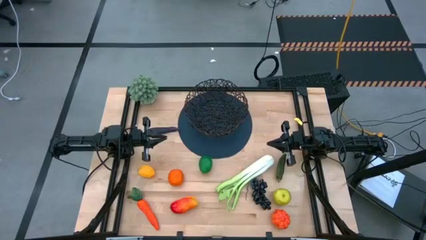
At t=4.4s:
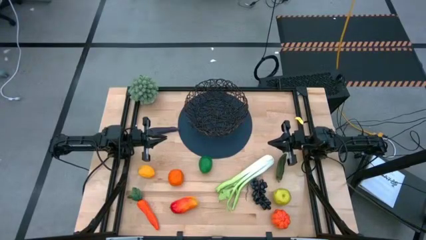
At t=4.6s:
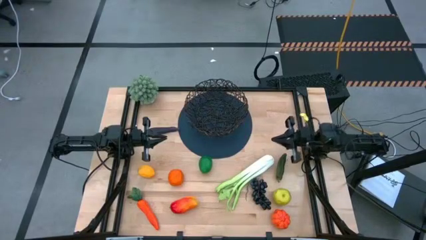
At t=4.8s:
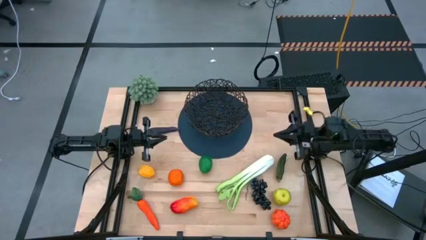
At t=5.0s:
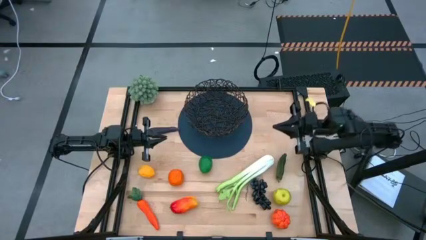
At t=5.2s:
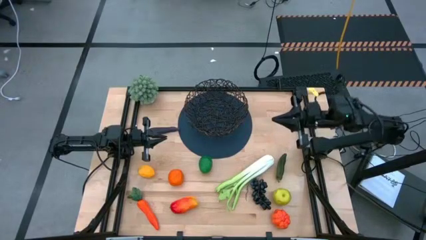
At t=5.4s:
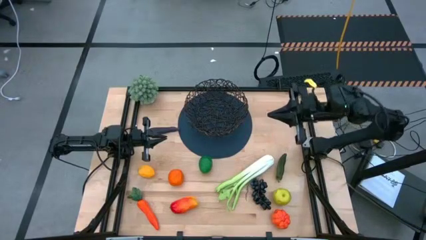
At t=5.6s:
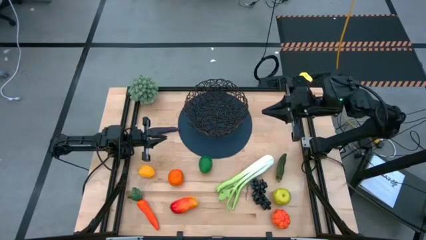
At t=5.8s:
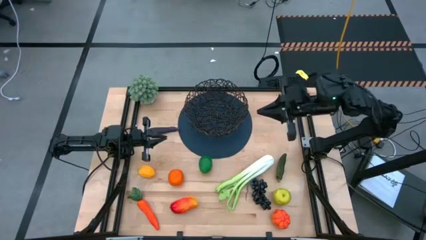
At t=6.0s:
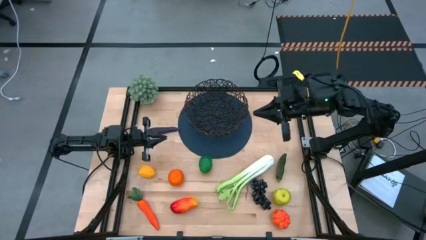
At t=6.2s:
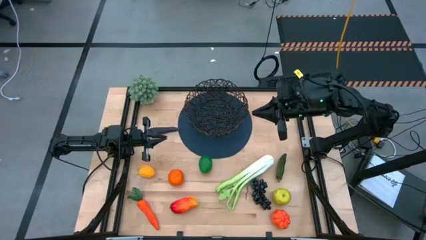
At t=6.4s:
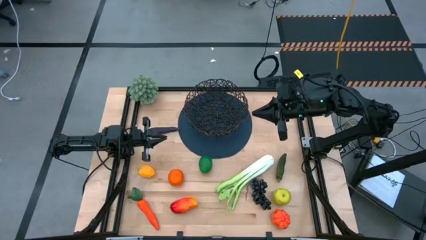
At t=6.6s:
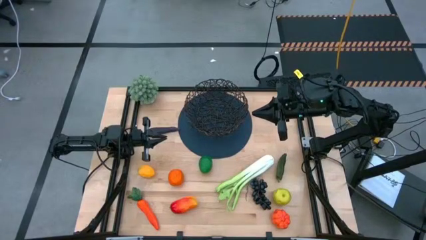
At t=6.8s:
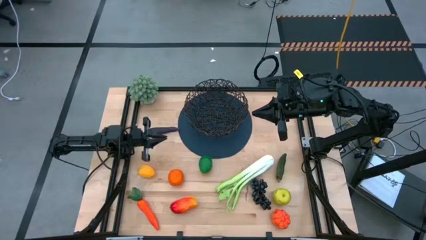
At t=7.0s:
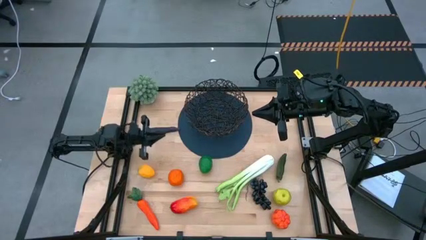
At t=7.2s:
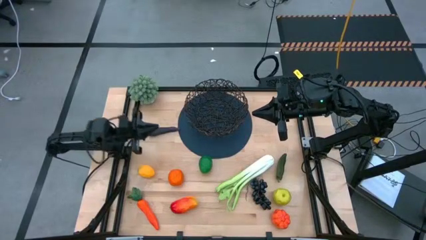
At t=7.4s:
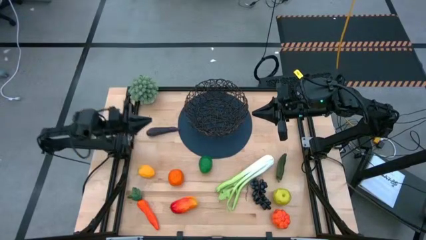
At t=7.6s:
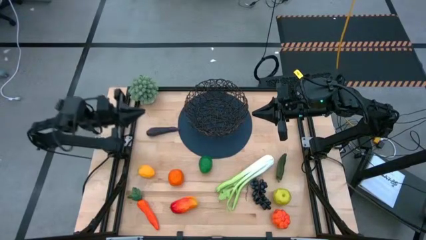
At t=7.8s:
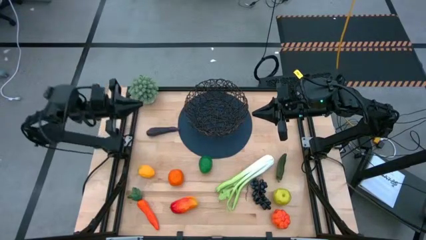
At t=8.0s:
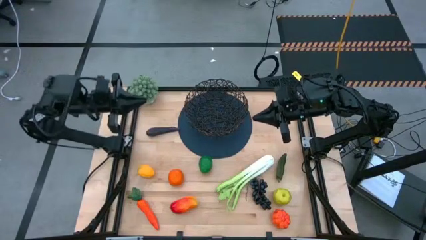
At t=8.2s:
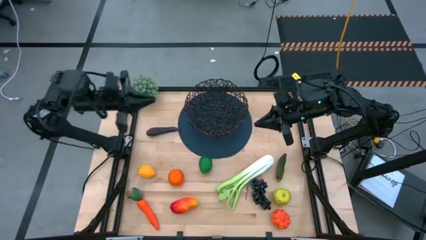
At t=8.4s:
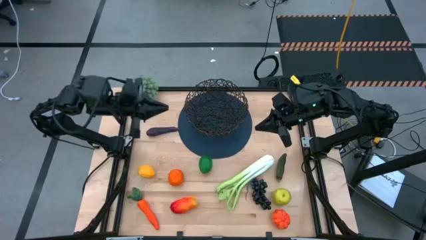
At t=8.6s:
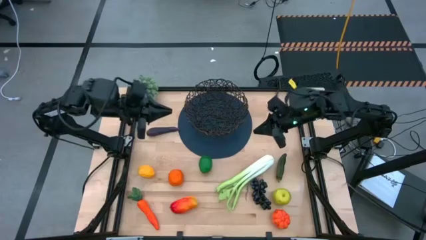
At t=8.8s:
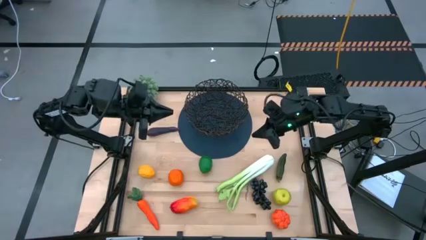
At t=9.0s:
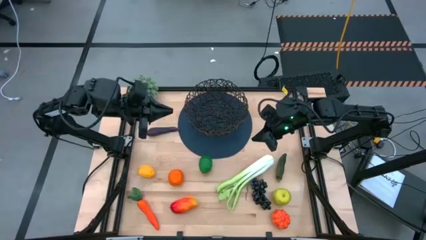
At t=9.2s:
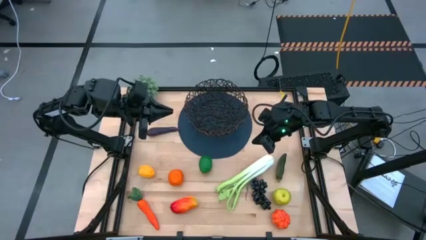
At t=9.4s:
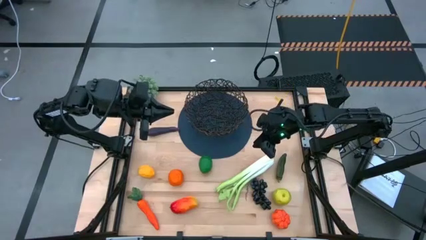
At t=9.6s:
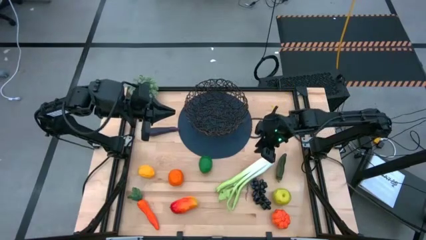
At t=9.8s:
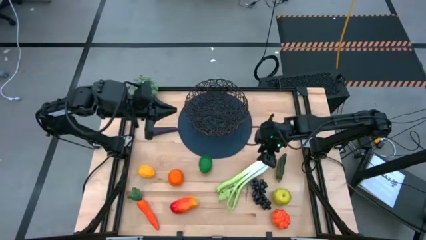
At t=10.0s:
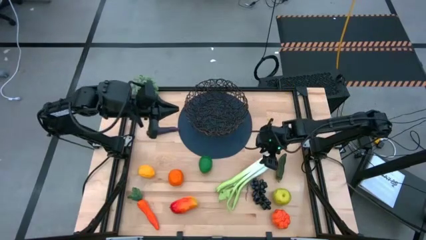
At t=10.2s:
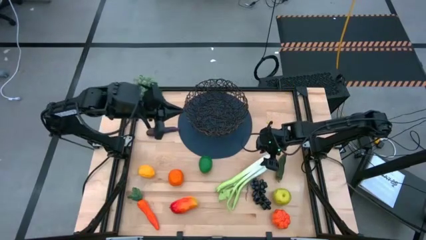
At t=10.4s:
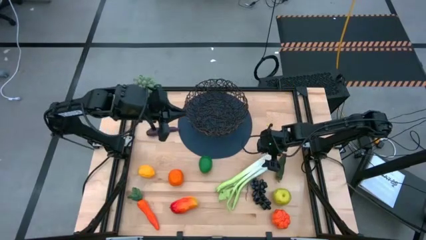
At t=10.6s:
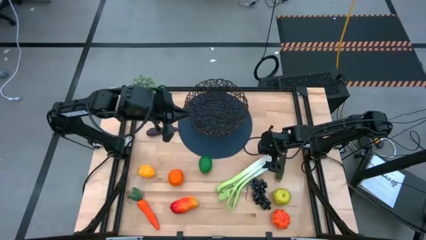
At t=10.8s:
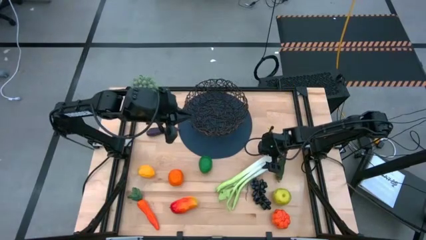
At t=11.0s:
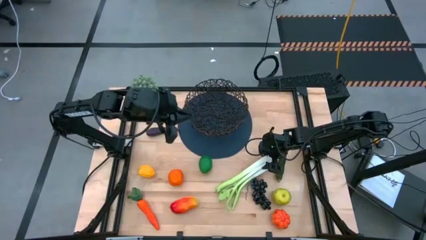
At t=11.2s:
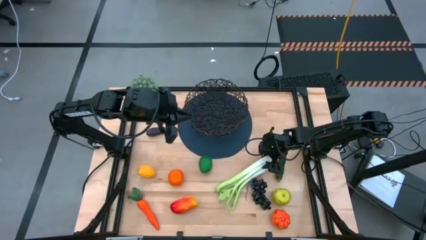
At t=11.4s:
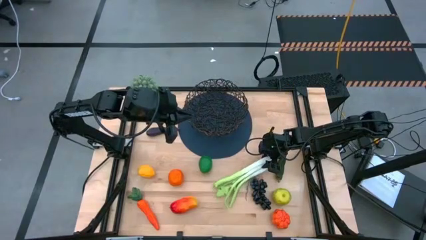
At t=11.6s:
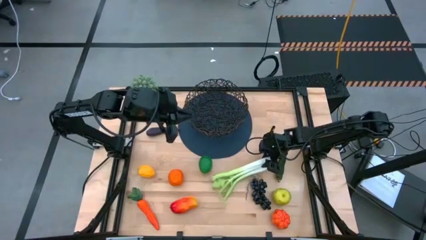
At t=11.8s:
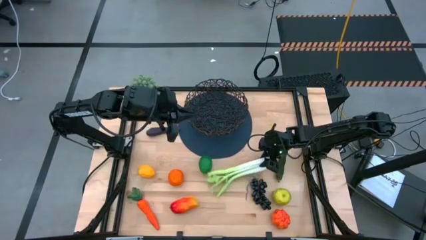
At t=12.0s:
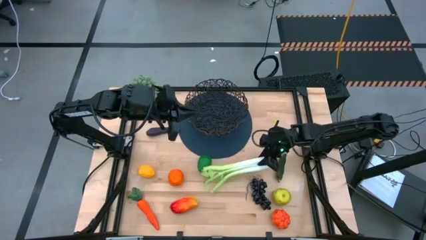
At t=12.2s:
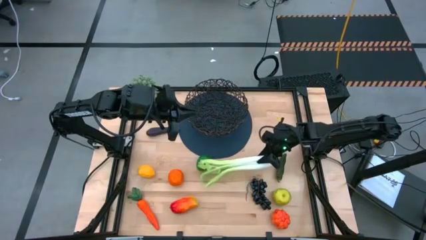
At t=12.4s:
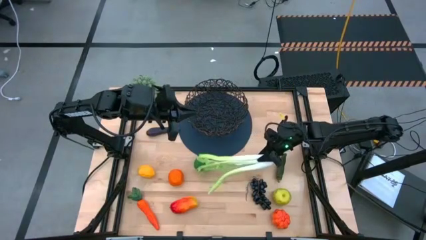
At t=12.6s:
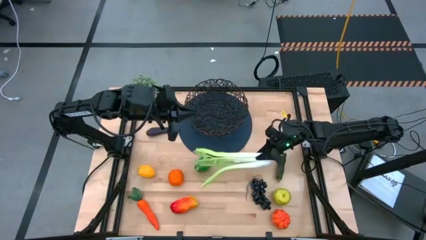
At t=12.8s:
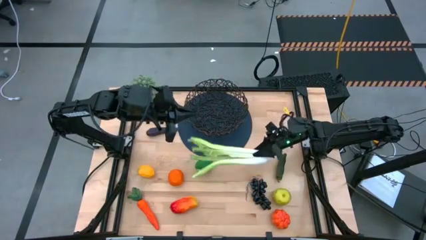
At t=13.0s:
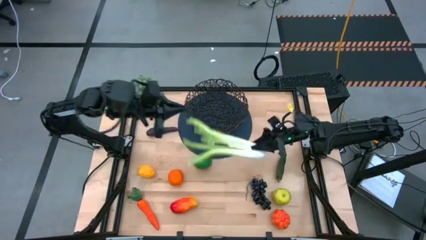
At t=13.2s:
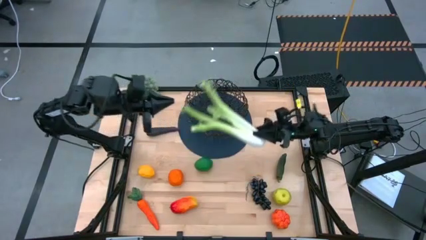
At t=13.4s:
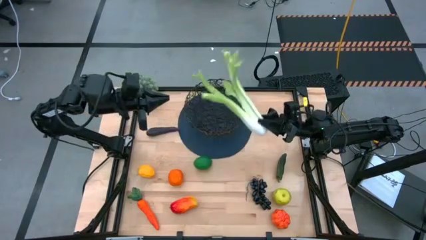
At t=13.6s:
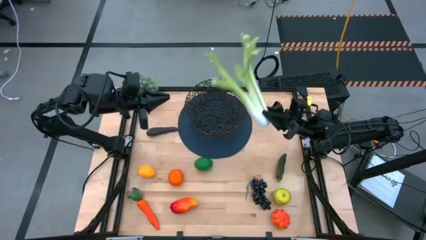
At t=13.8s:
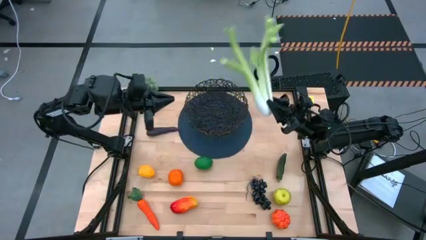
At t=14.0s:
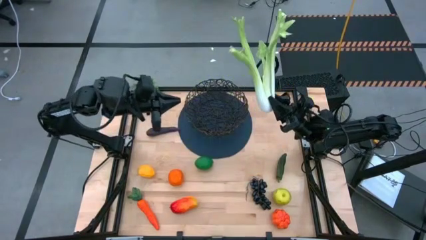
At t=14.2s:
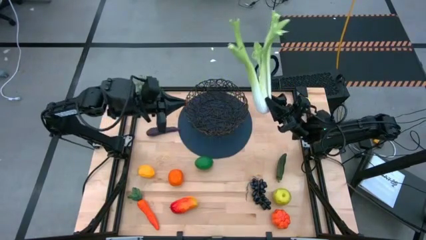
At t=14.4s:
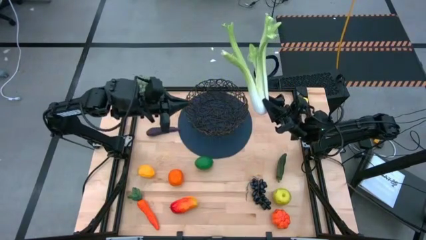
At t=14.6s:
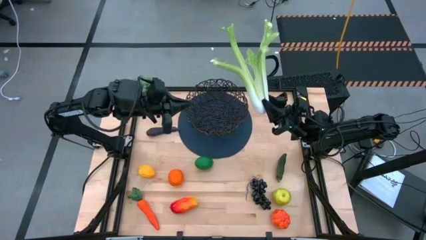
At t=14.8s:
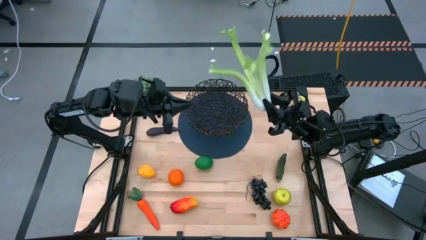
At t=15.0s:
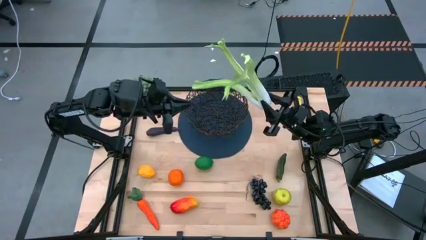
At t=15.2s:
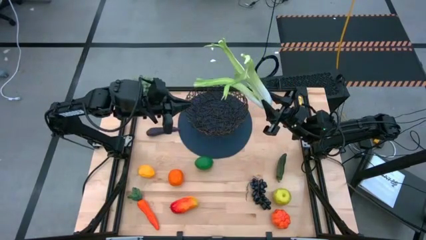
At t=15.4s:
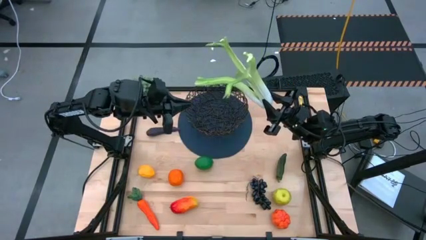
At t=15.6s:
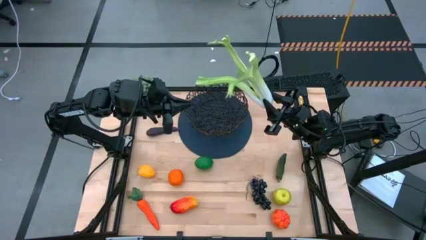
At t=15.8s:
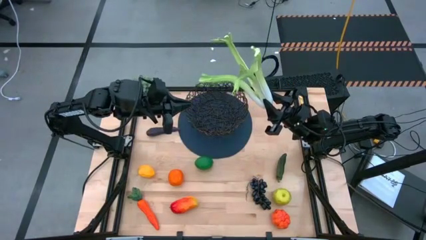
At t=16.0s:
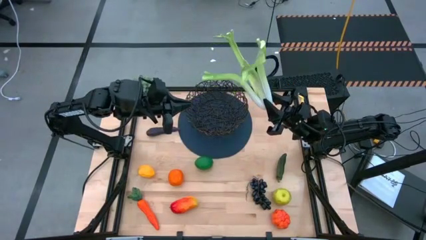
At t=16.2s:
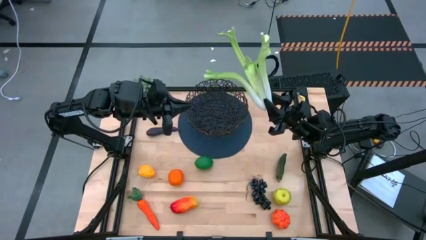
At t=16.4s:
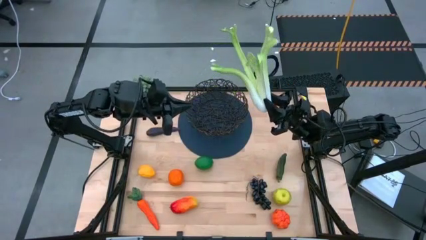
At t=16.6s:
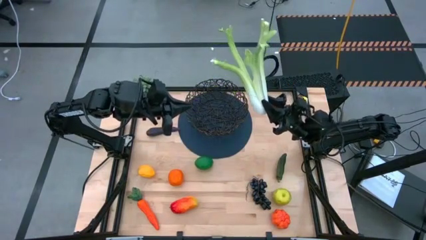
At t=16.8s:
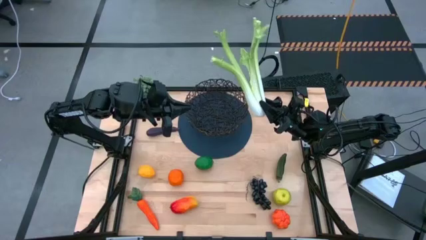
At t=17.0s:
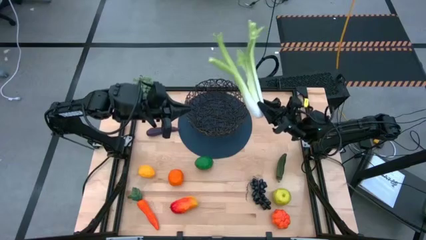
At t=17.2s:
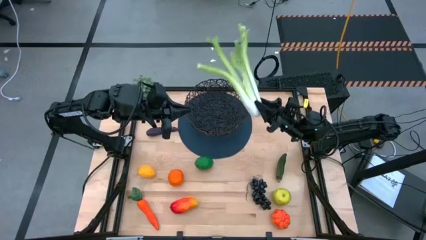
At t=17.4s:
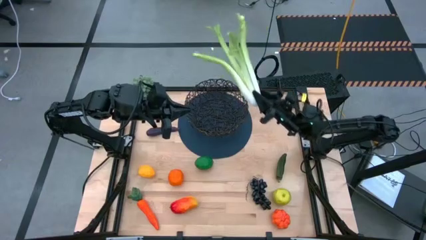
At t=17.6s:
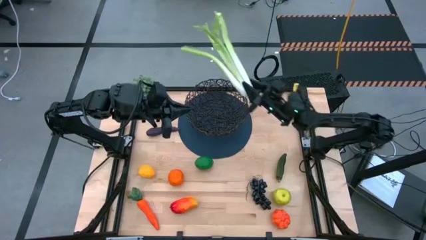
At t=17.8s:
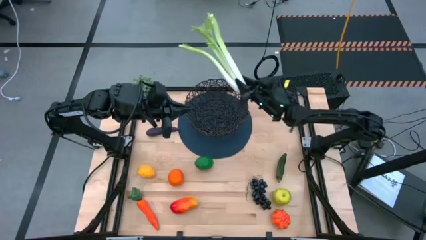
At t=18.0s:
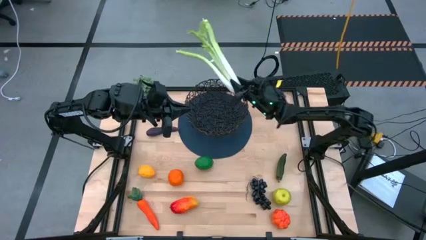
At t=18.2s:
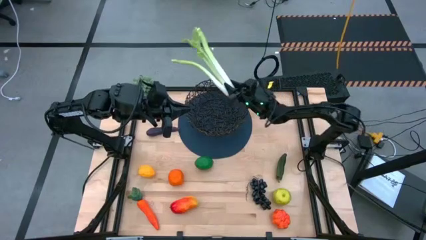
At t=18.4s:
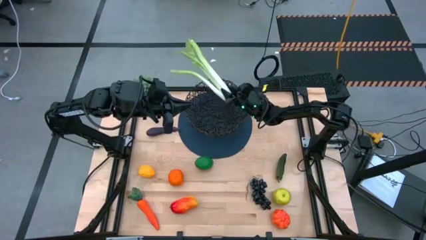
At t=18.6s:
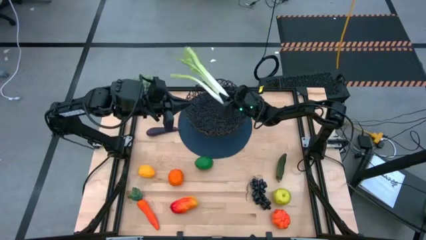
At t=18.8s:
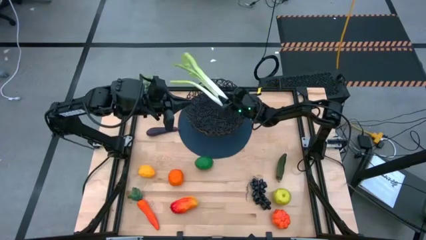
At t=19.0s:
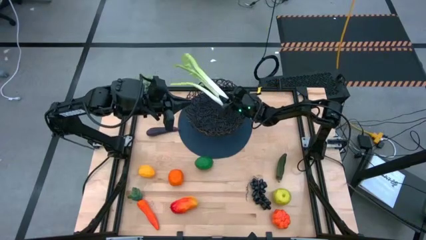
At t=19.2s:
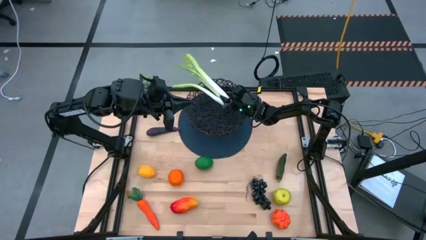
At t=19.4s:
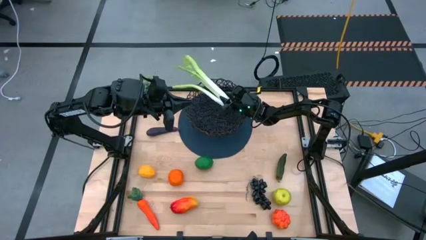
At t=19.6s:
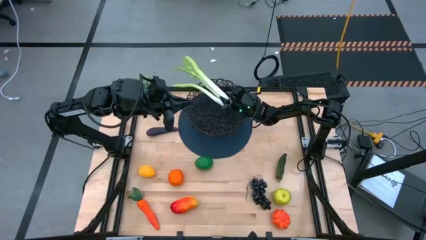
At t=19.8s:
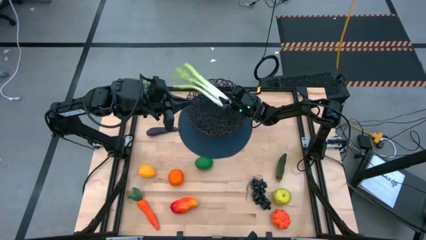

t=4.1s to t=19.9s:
Task: Build produce basket
Put the green celery into the wire basket
